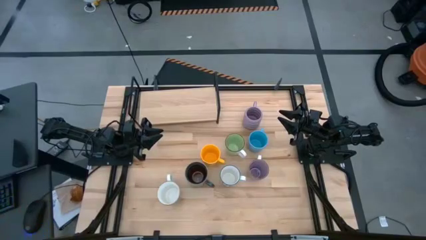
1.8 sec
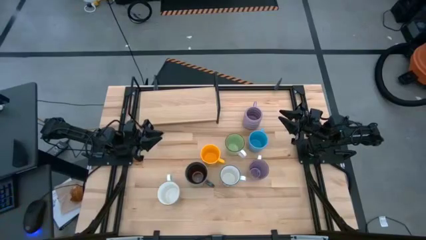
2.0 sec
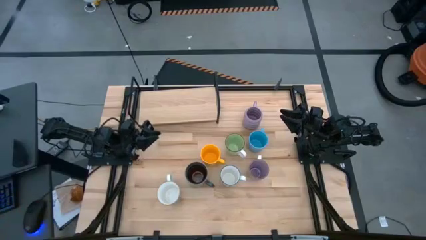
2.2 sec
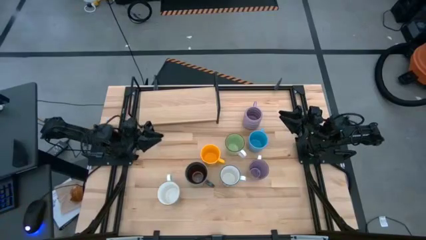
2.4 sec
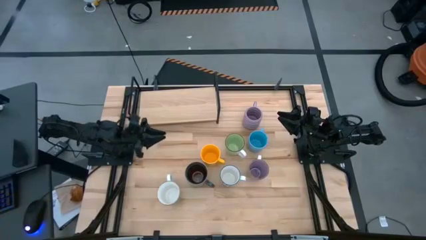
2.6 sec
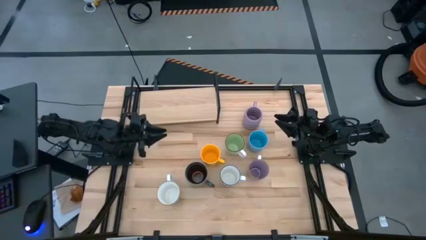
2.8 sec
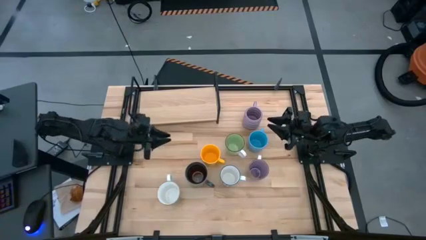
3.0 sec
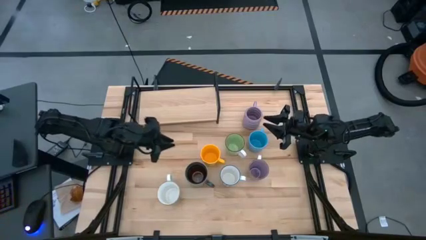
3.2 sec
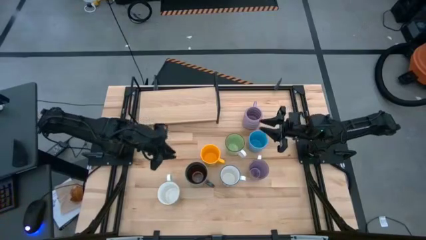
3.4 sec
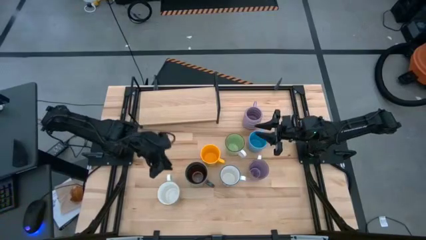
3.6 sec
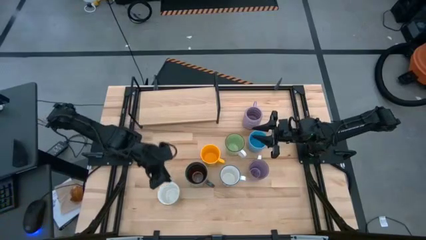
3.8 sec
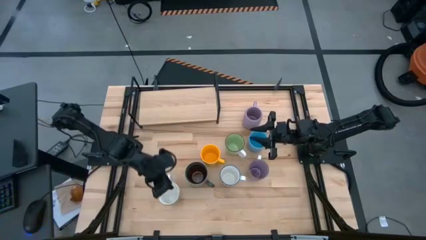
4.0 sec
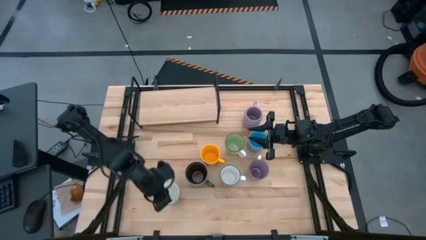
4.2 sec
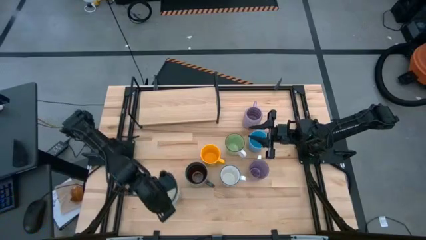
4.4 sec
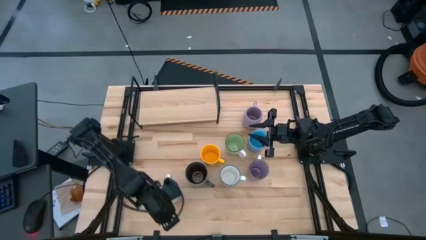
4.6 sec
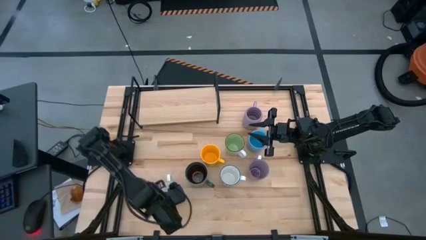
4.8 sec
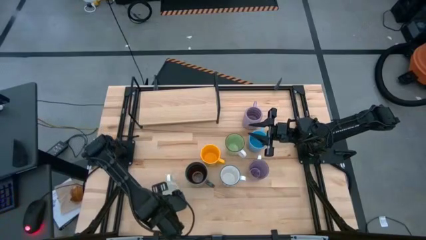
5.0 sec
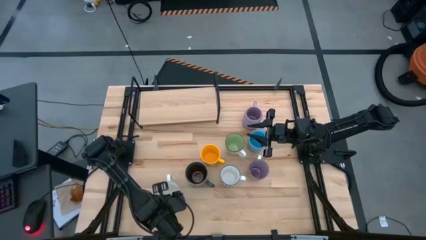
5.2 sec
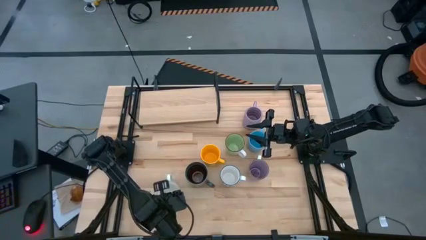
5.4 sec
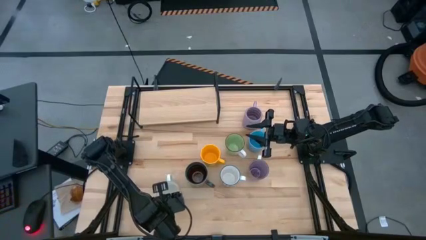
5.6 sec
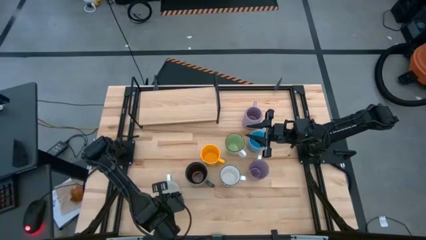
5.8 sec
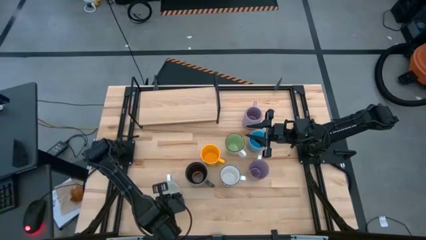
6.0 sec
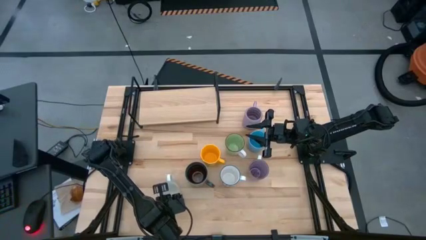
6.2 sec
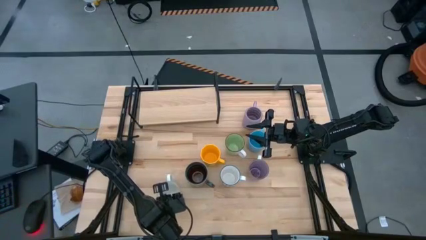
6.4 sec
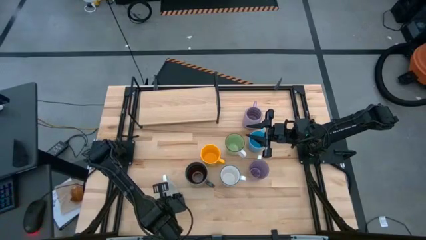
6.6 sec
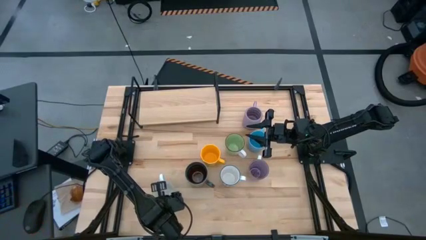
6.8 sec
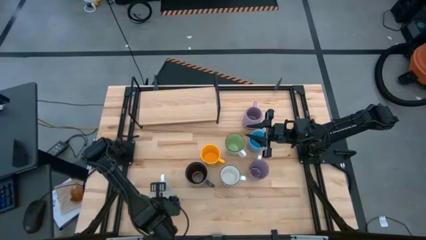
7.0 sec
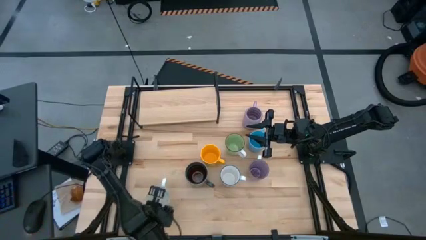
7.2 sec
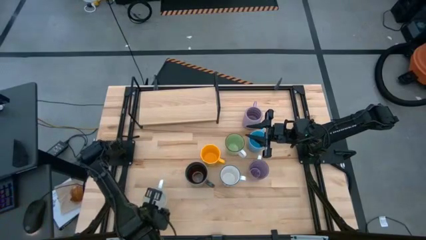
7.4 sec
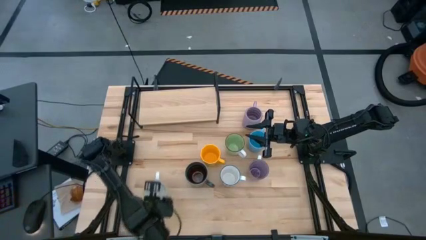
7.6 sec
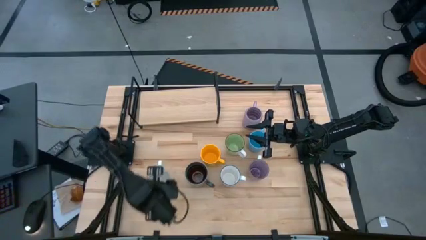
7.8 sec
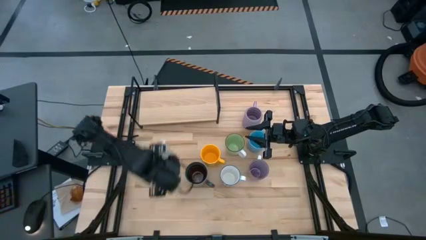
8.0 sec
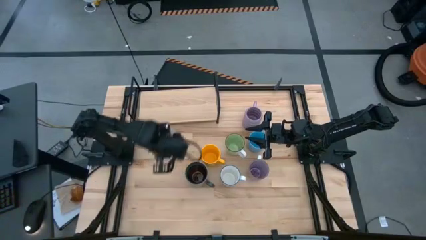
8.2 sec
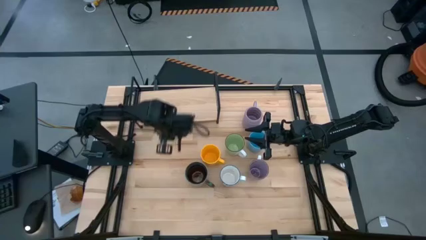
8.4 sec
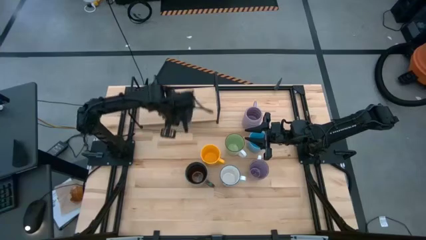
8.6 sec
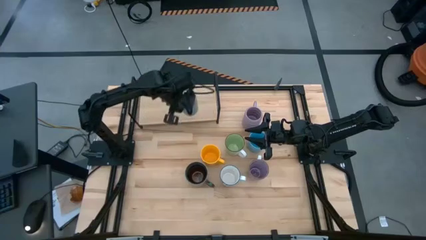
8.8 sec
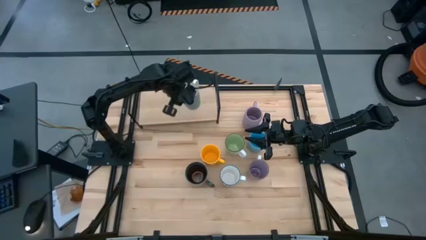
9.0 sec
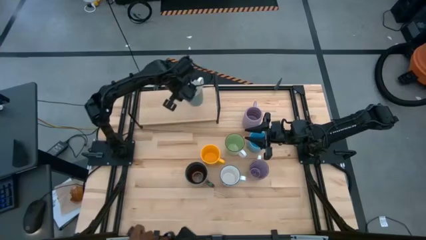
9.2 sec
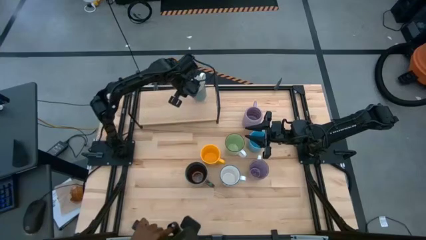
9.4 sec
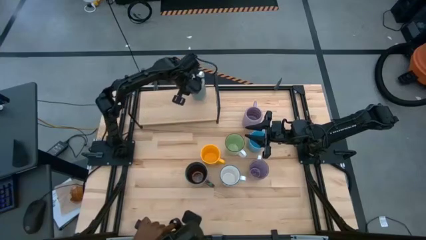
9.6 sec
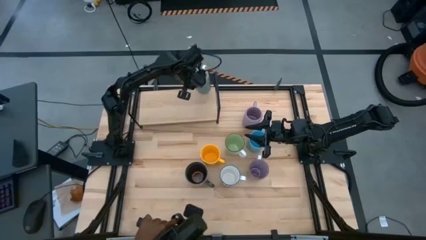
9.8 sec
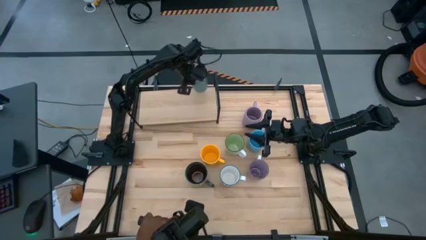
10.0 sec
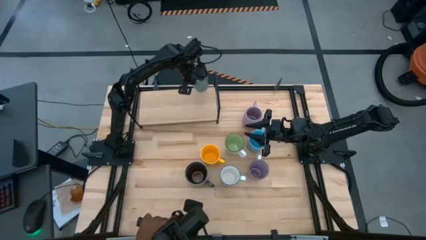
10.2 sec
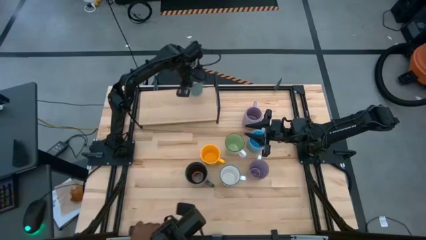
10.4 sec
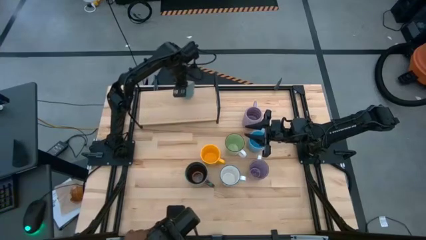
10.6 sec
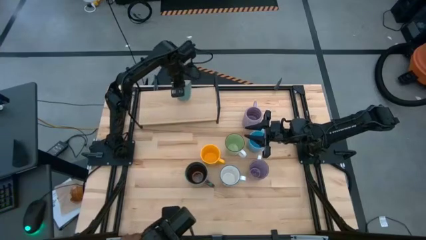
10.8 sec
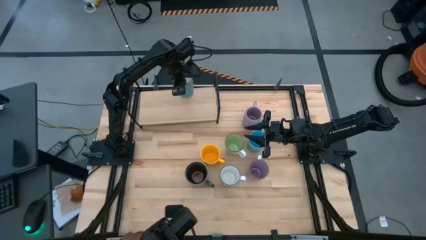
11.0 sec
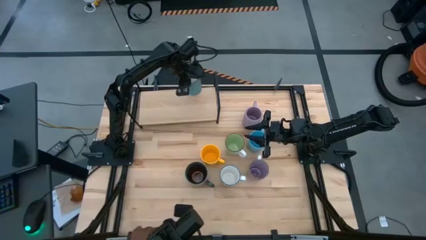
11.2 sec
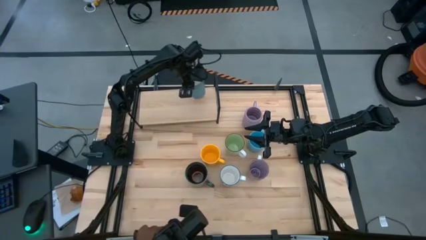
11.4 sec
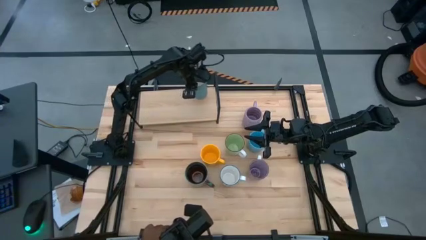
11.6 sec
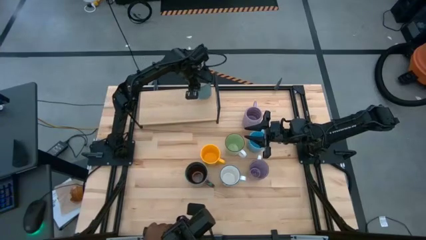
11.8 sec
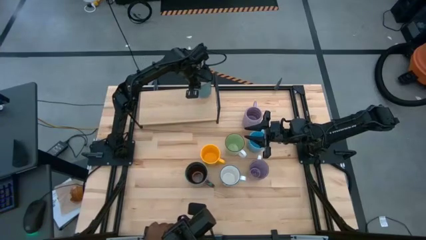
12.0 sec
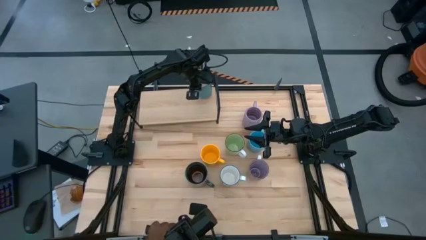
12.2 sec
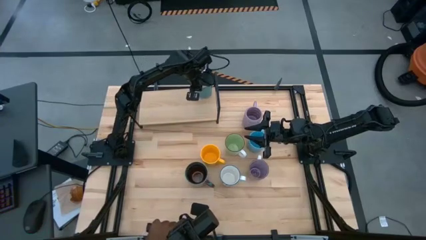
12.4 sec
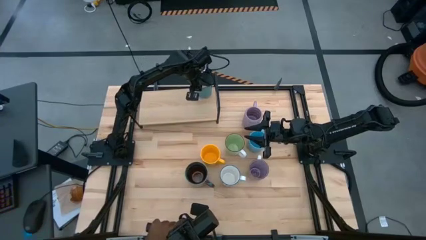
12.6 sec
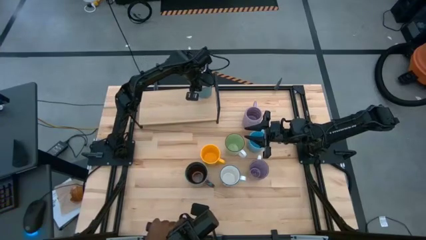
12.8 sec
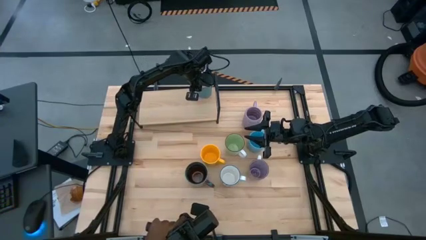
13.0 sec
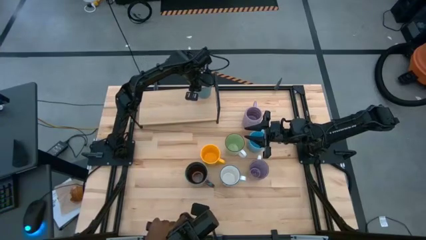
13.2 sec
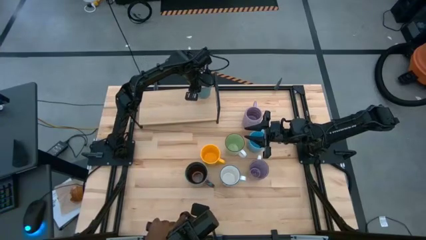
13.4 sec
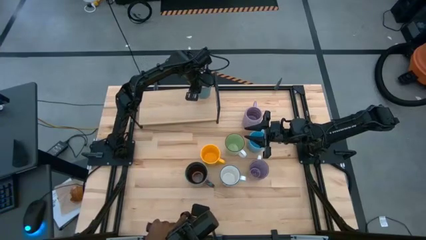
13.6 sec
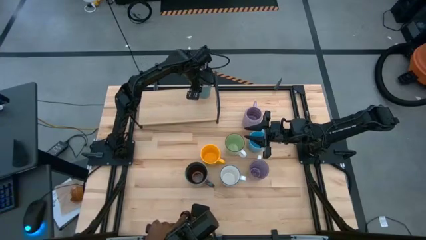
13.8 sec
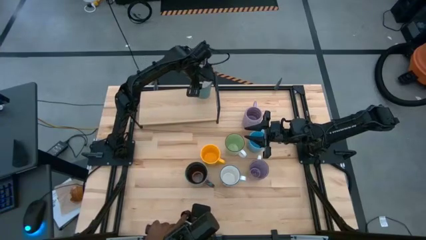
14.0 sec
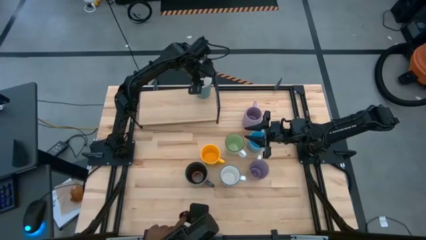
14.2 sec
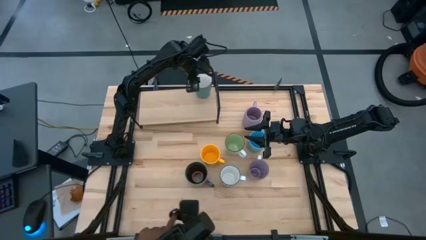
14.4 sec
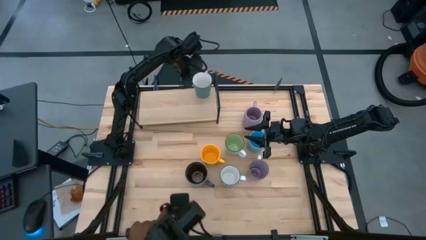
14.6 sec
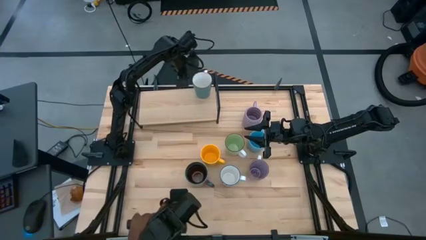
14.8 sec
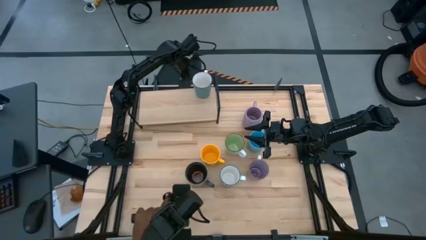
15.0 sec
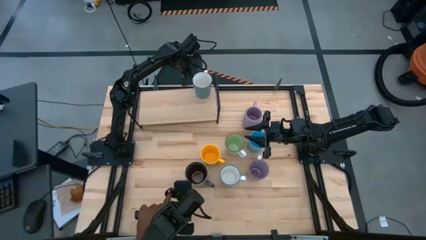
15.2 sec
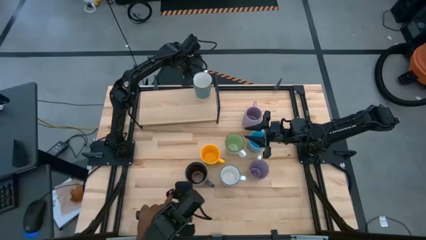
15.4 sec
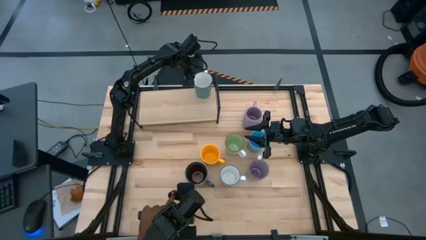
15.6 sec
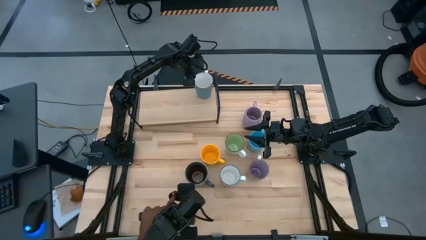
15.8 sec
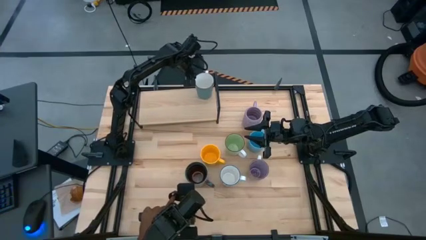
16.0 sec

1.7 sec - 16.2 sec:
Task: Place coffee mugs
Put the light green mug on the shelf
